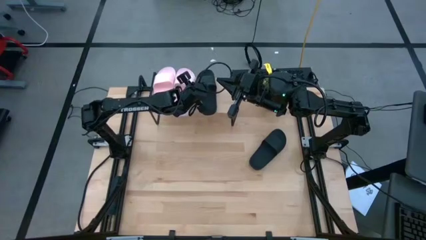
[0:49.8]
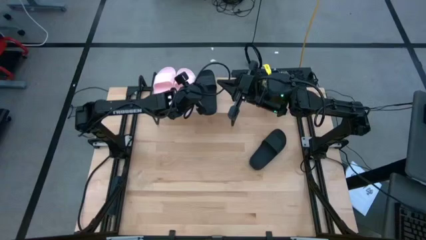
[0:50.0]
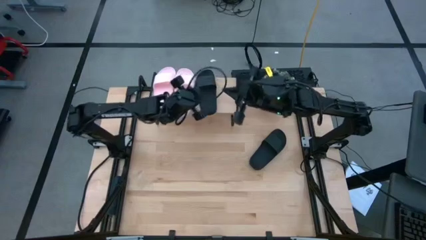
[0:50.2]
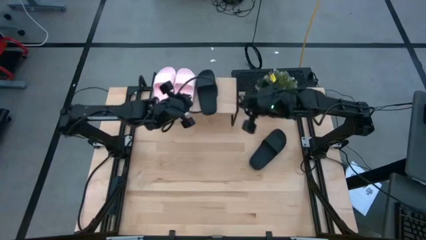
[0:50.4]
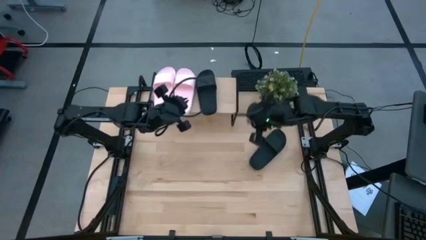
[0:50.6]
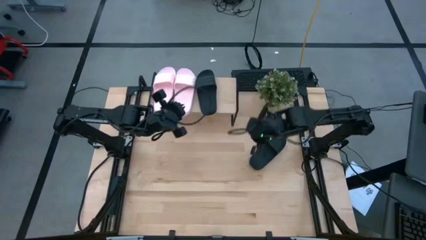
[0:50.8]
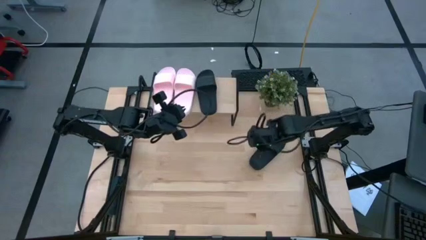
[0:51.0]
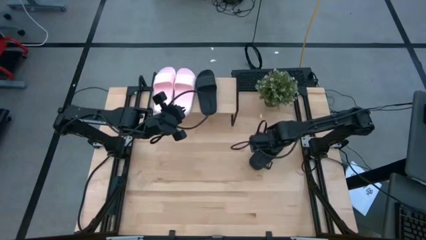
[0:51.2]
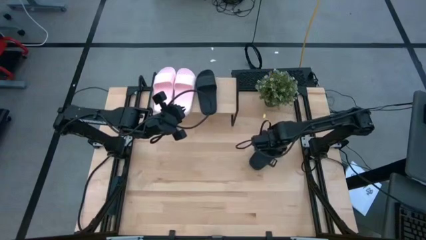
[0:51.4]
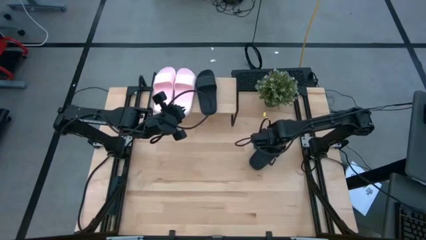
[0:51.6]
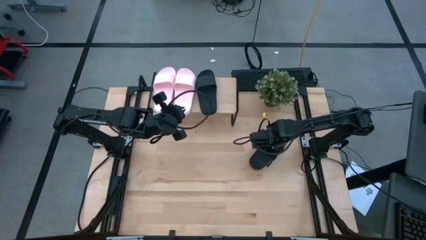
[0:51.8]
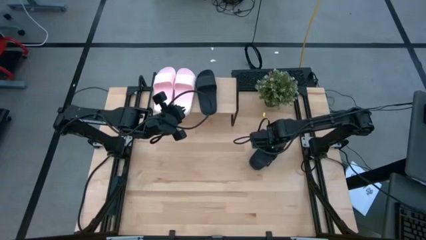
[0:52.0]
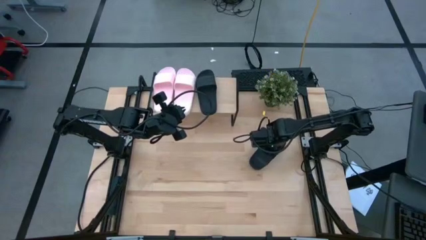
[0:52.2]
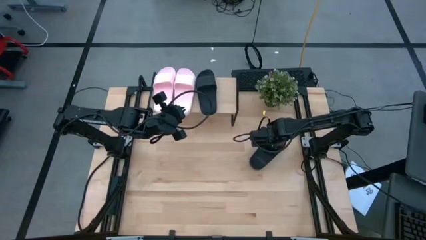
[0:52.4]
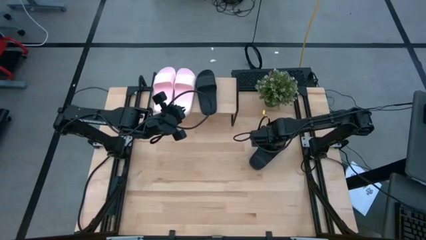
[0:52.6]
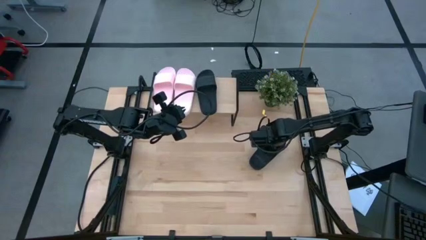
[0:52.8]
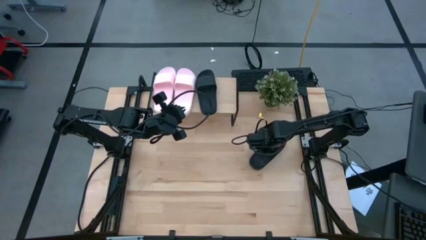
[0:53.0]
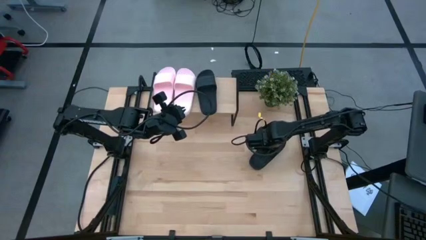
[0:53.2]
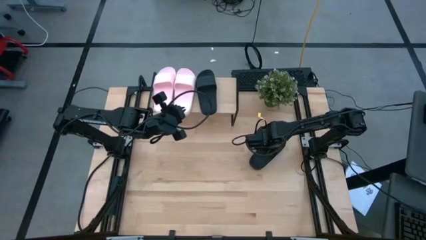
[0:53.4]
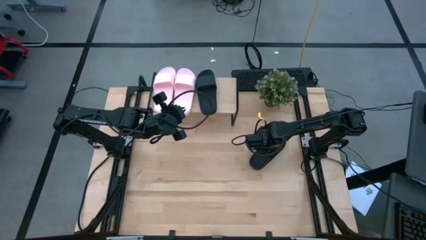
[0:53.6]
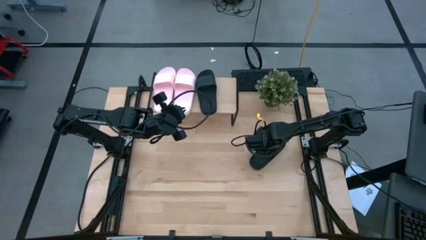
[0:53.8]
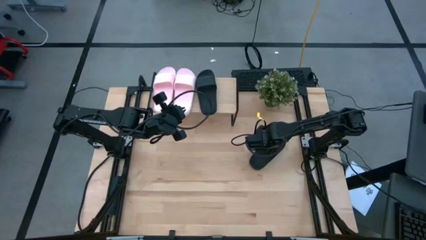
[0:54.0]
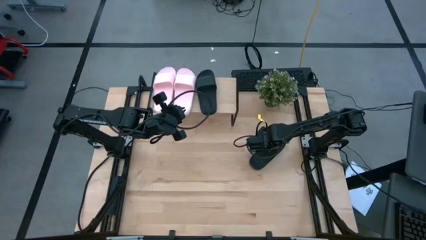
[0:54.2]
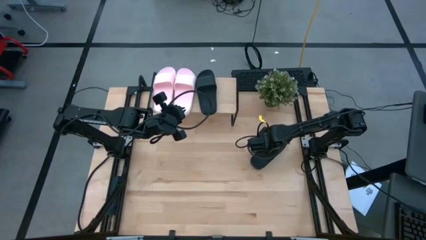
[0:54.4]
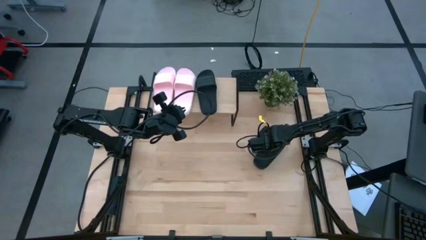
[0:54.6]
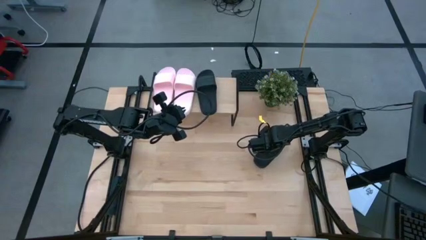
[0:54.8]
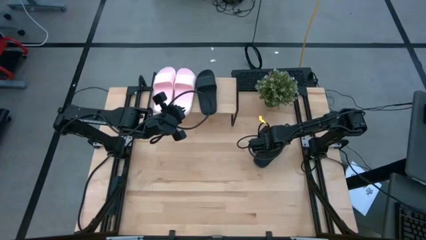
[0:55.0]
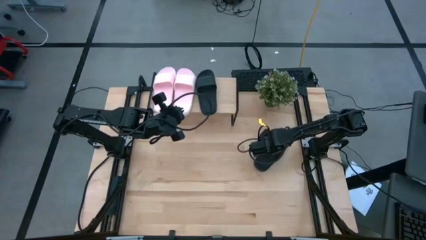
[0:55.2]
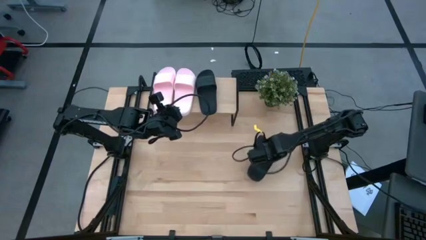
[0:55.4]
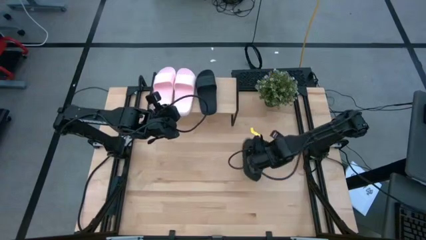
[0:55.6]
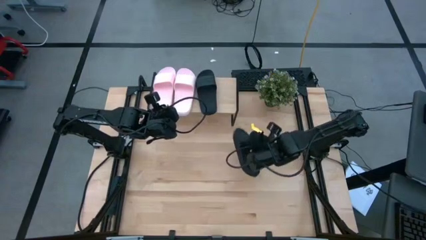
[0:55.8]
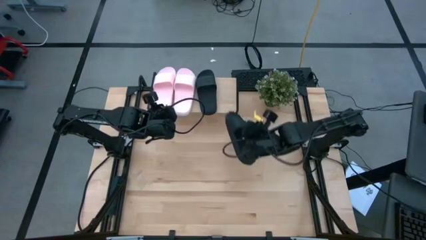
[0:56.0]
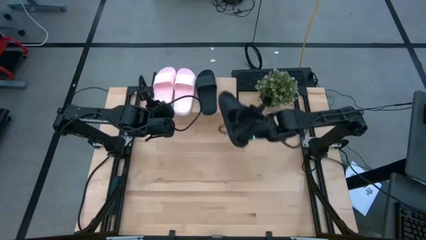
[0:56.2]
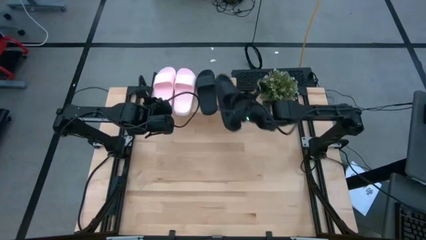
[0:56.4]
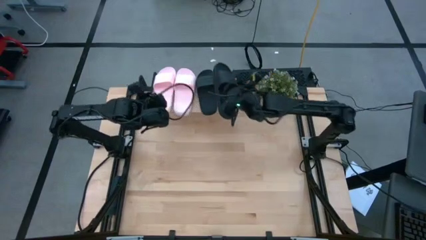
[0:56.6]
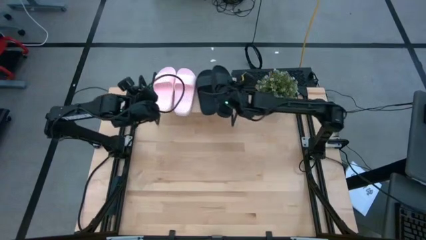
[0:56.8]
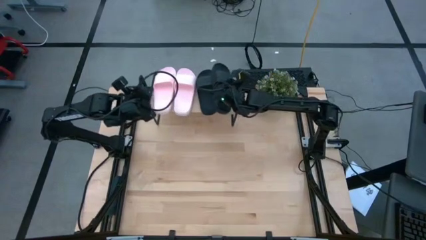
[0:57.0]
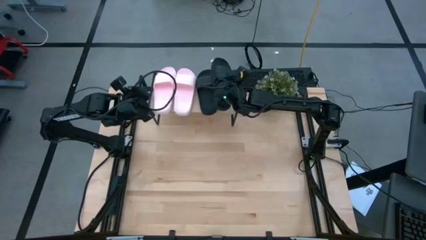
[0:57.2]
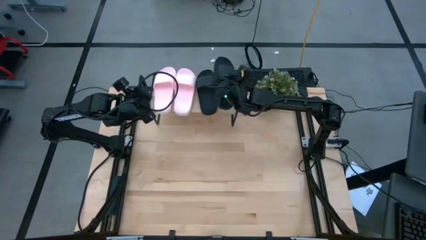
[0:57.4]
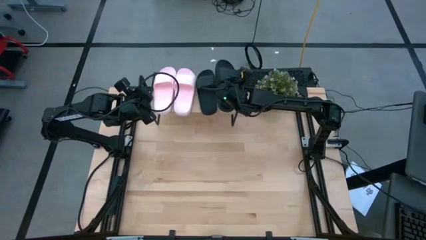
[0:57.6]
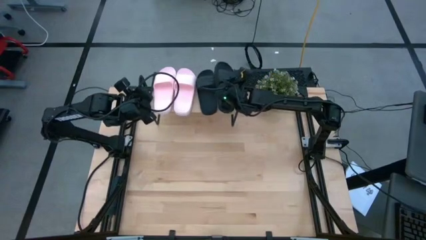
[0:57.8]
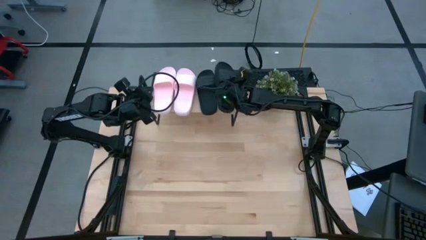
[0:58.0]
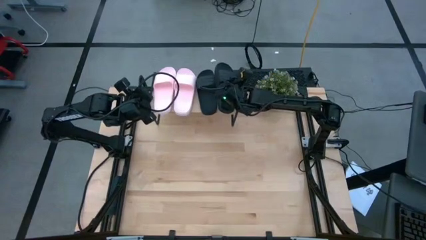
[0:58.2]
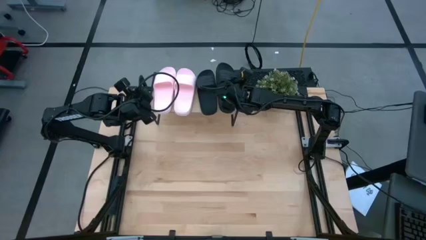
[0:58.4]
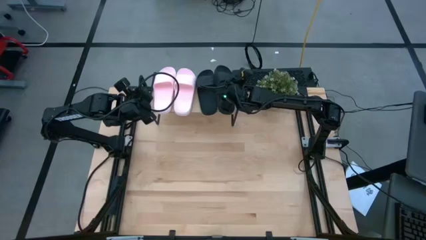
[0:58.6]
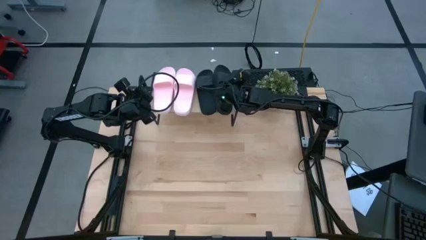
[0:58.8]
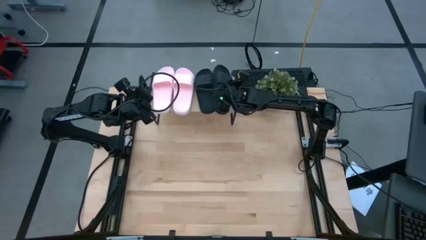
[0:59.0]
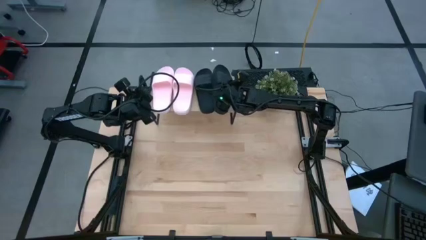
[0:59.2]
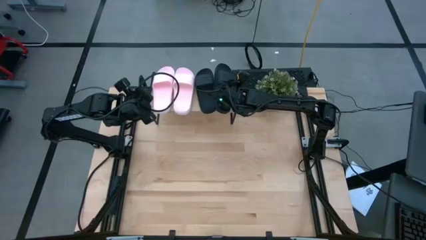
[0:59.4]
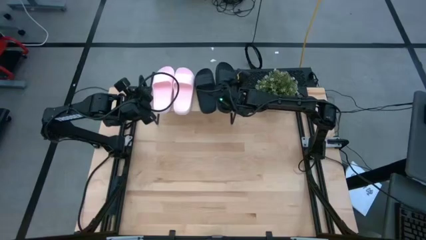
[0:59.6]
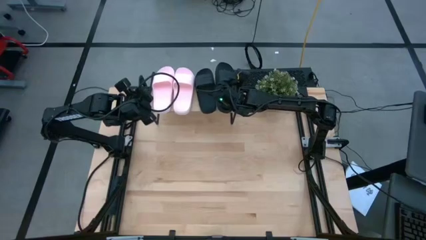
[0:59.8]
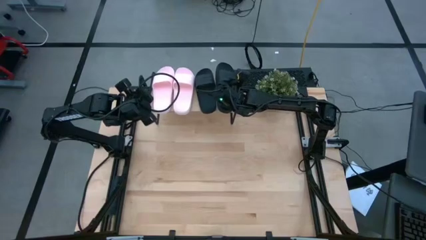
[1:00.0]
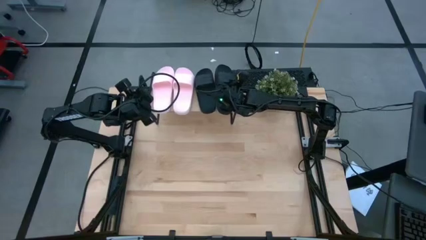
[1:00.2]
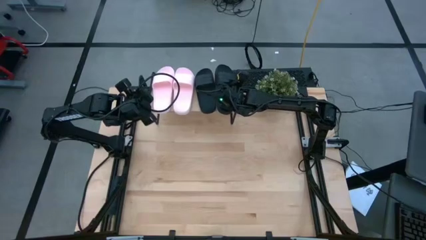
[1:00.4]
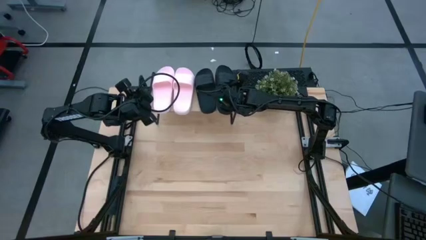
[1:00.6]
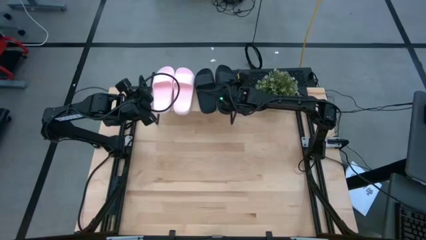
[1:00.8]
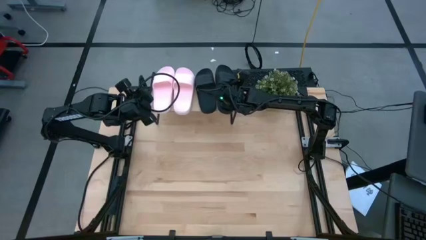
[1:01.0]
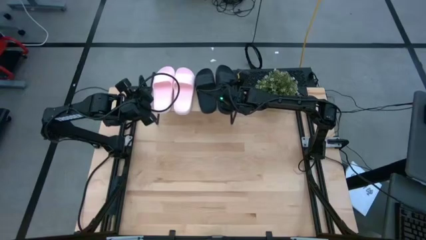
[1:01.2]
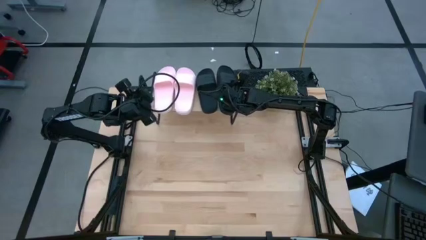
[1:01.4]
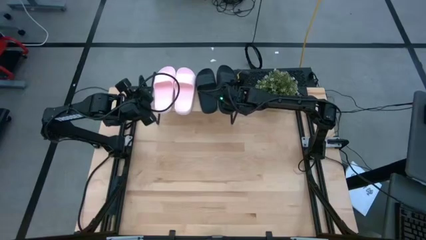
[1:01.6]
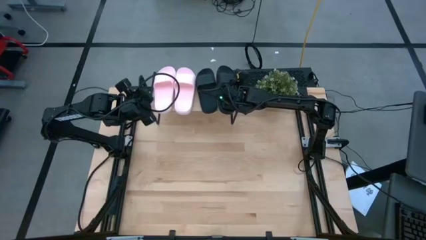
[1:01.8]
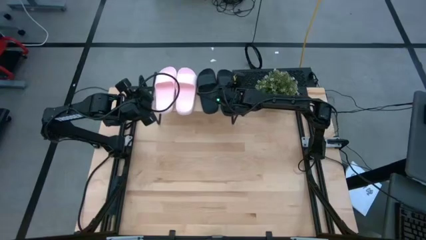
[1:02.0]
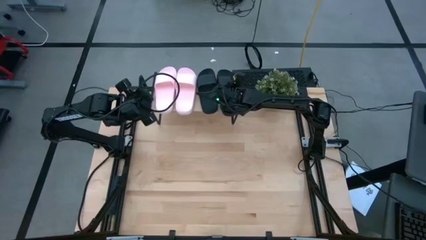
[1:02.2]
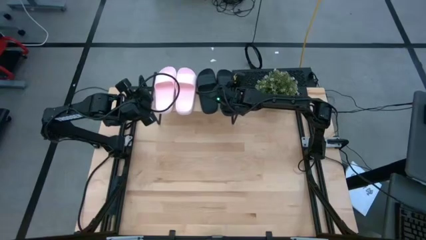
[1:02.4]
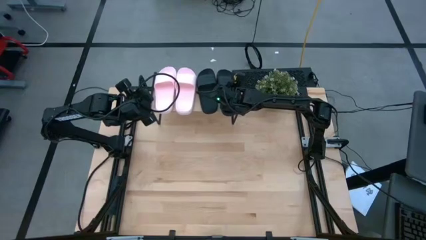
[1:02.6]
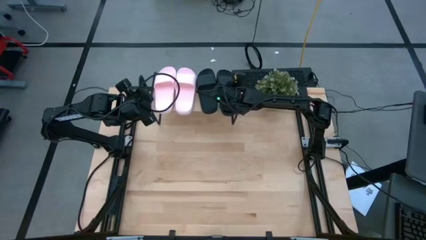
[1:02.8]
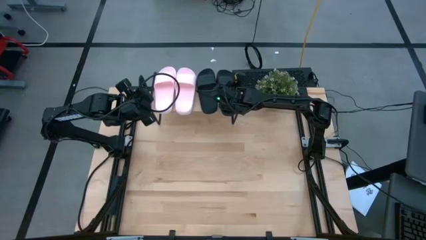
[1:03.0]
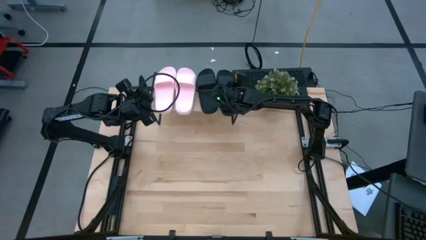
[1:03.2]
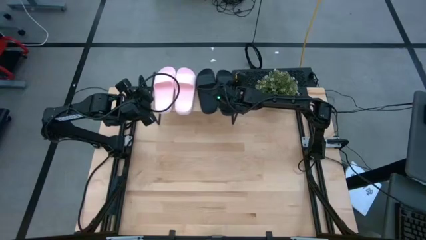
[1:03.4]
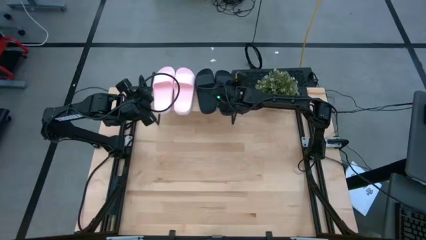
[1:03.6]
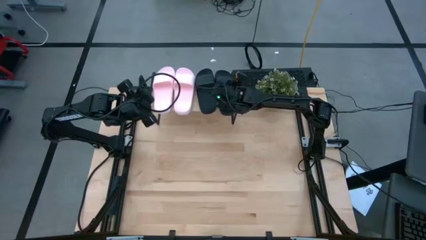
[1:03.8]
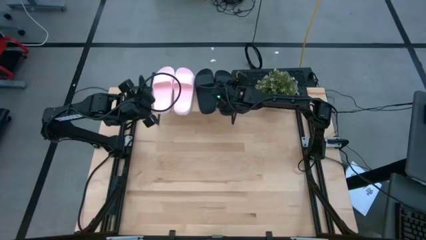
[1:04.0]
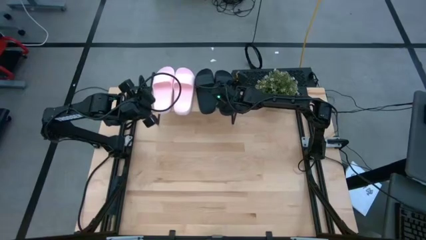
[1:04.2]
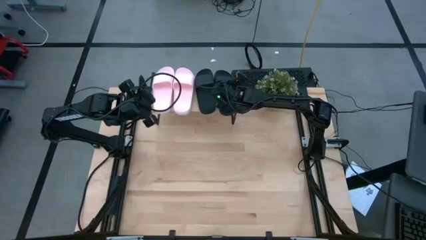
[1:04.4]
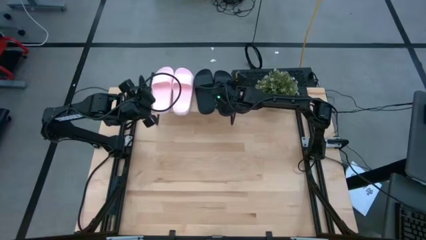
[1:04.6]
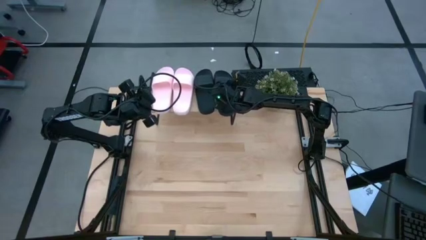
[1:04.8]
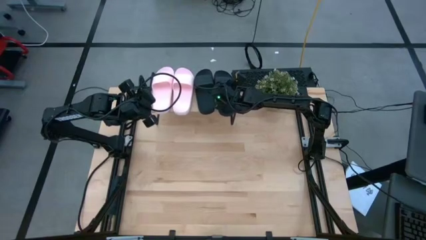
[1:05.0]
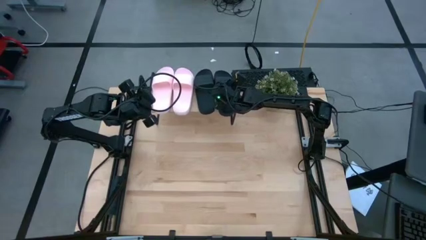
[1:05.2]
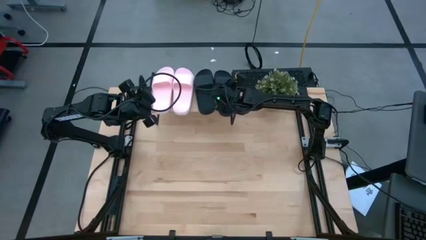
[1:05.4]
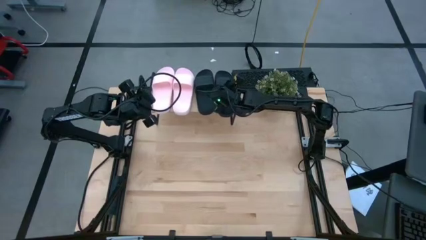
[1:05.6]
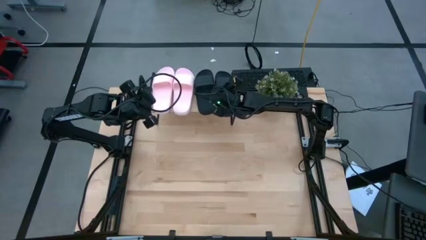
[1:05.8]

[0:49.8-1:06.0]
Task: Pick and place slides into the shelf
Put the black slipper on the shelf
